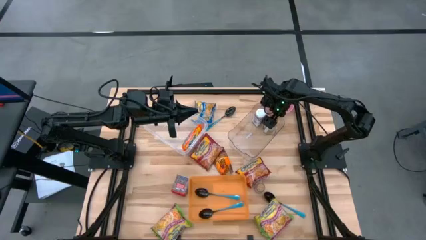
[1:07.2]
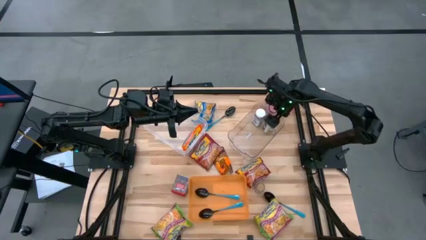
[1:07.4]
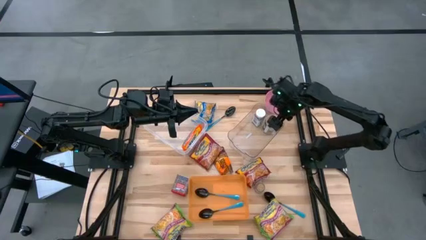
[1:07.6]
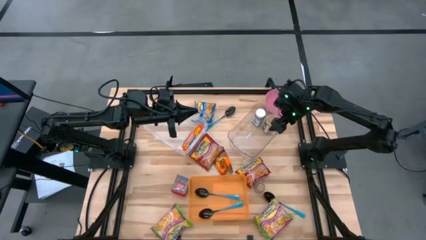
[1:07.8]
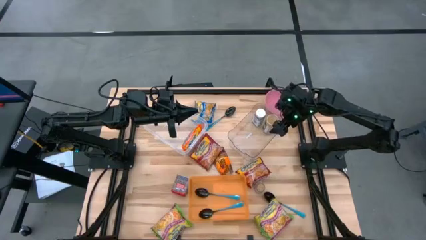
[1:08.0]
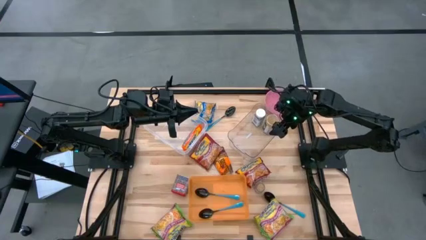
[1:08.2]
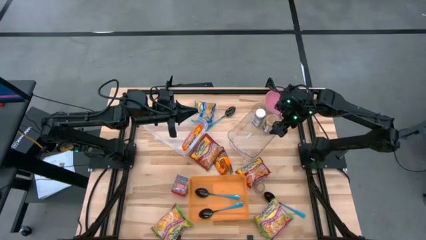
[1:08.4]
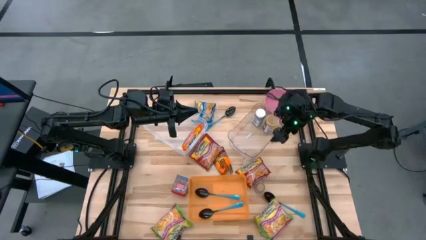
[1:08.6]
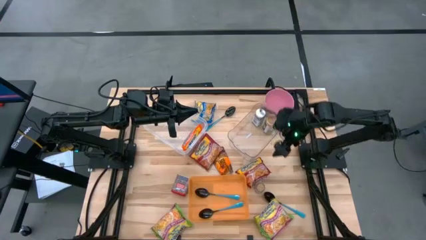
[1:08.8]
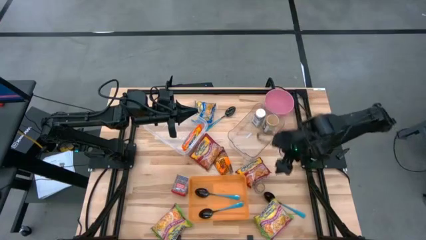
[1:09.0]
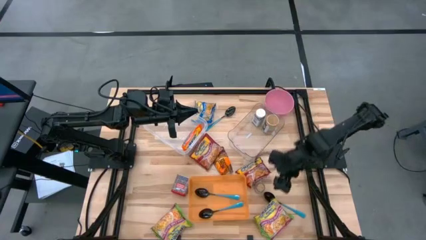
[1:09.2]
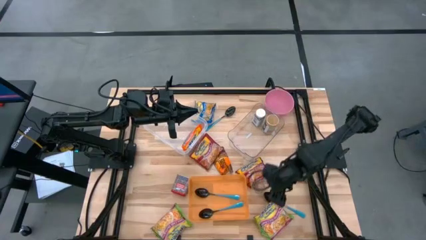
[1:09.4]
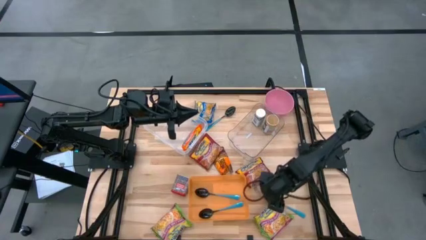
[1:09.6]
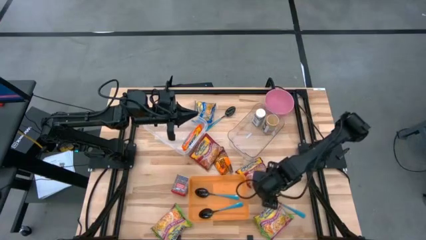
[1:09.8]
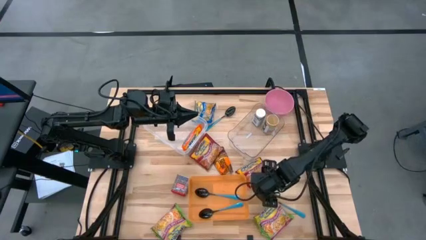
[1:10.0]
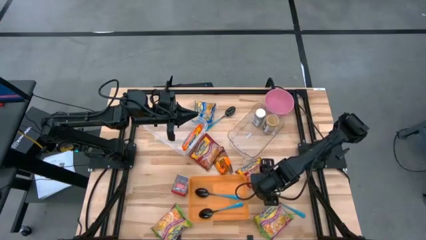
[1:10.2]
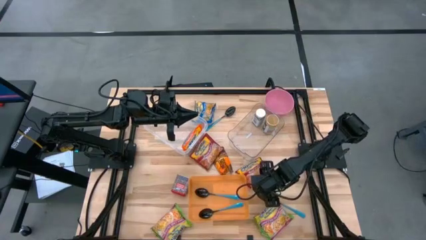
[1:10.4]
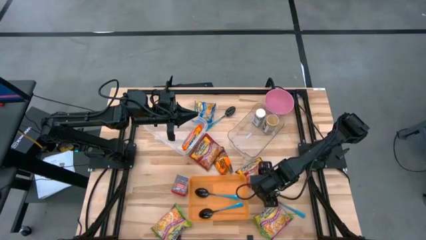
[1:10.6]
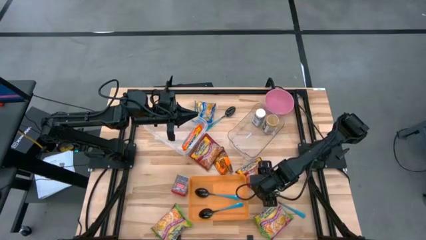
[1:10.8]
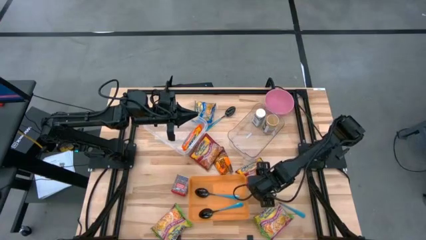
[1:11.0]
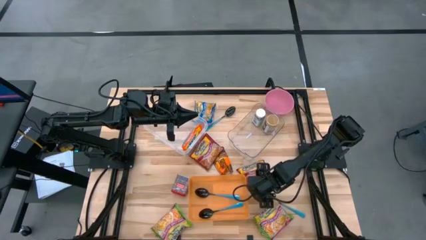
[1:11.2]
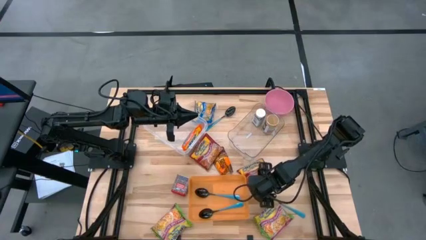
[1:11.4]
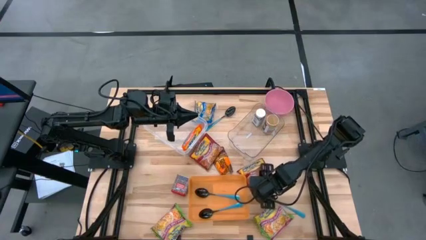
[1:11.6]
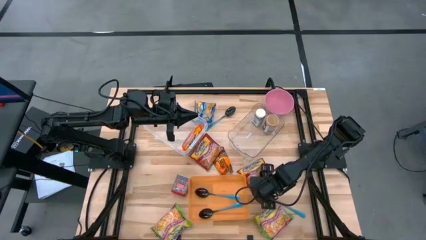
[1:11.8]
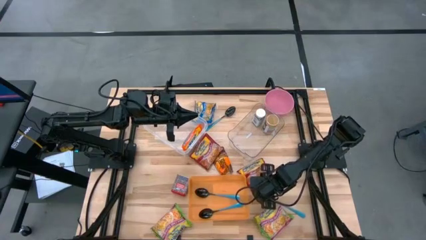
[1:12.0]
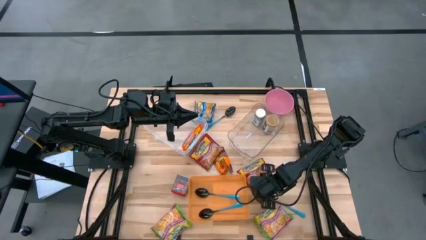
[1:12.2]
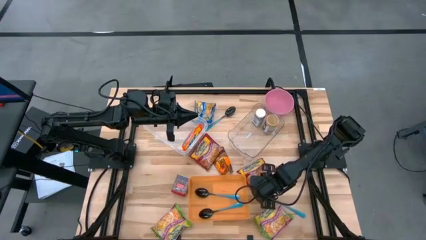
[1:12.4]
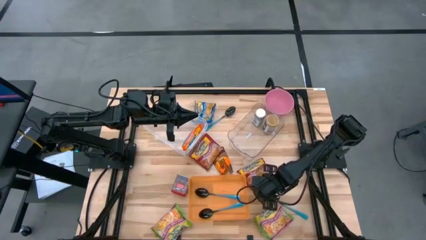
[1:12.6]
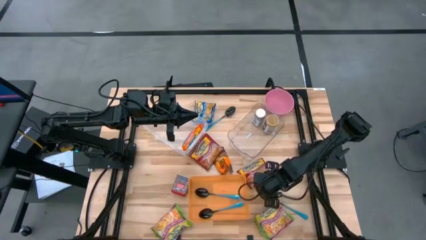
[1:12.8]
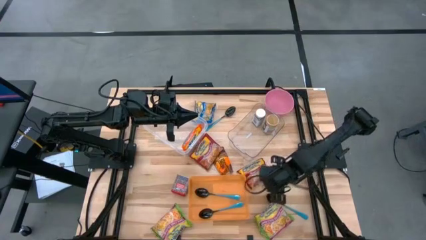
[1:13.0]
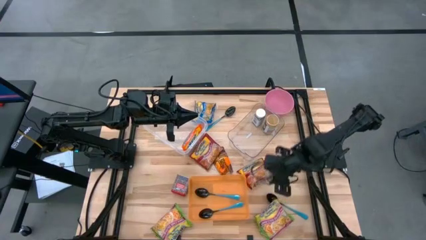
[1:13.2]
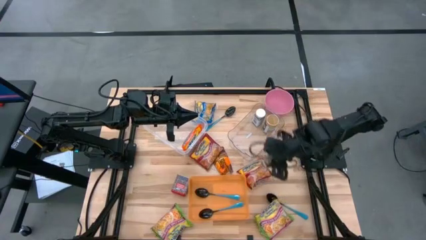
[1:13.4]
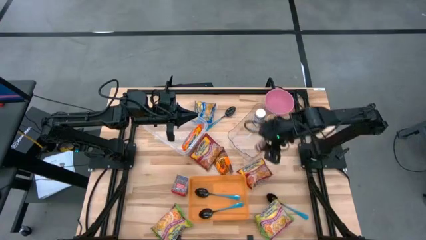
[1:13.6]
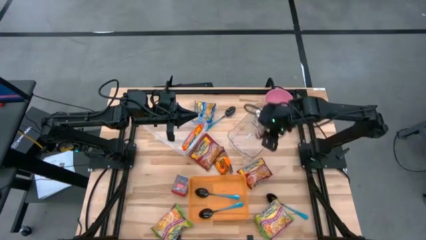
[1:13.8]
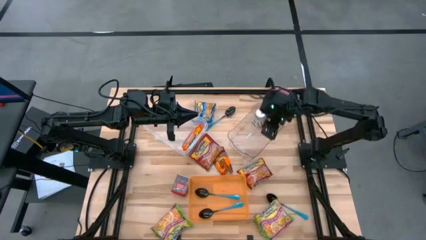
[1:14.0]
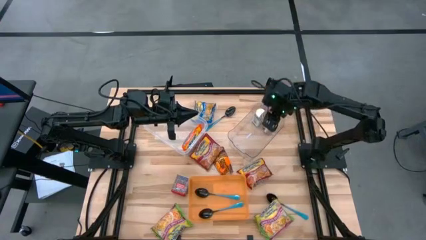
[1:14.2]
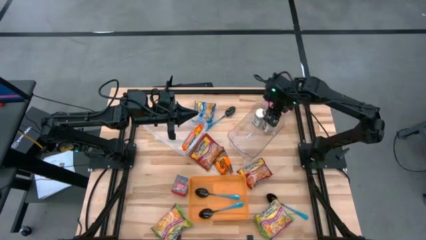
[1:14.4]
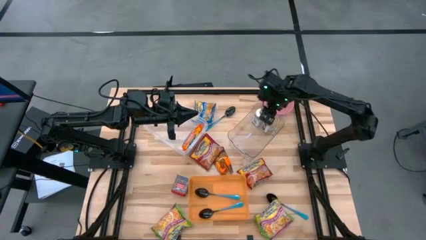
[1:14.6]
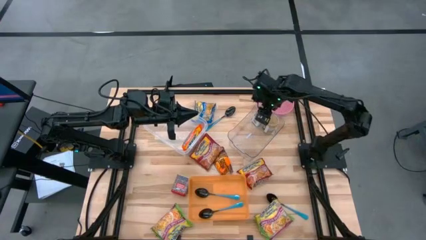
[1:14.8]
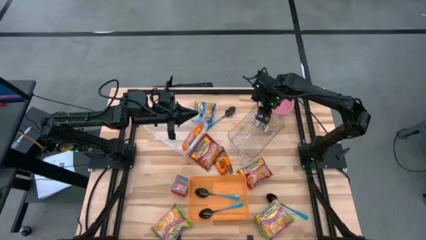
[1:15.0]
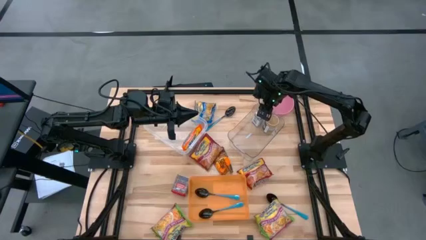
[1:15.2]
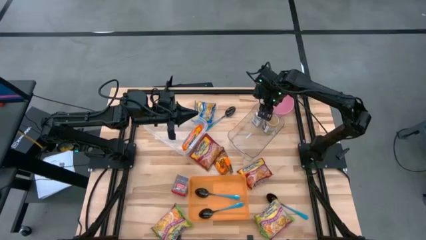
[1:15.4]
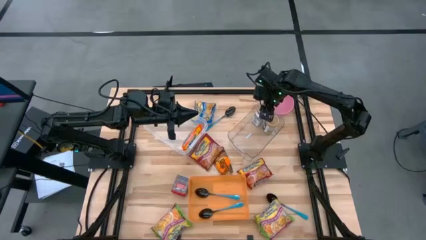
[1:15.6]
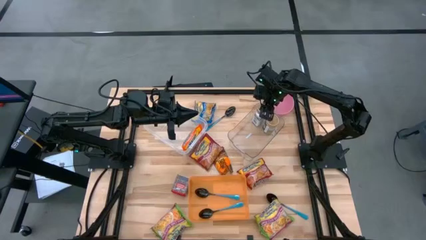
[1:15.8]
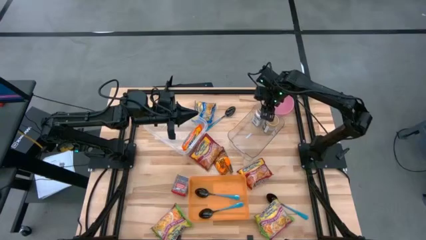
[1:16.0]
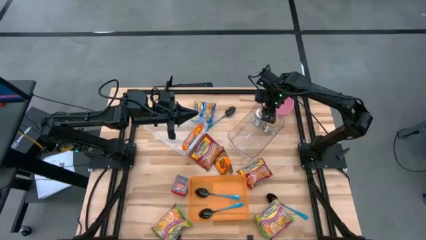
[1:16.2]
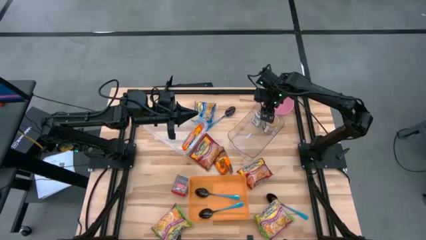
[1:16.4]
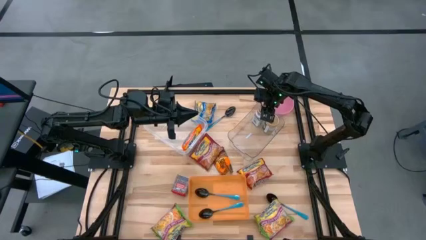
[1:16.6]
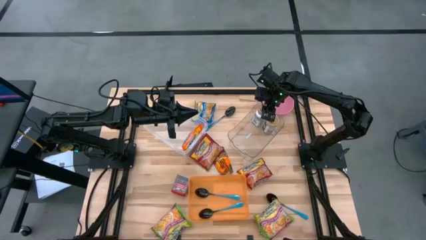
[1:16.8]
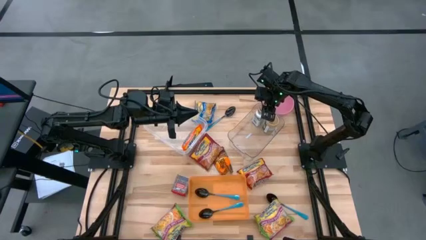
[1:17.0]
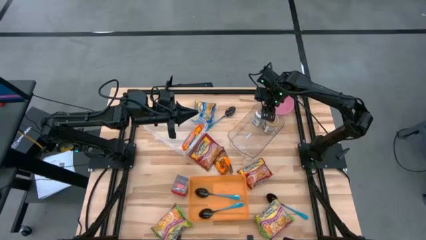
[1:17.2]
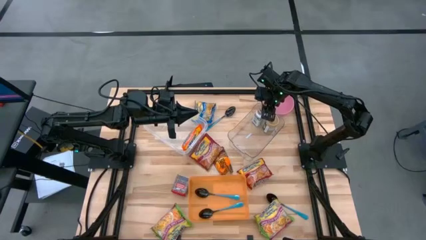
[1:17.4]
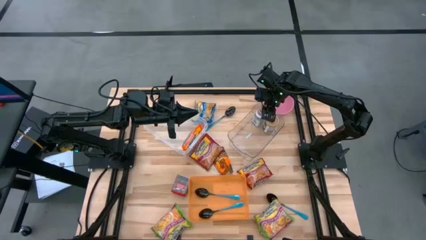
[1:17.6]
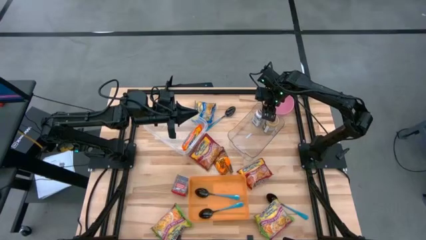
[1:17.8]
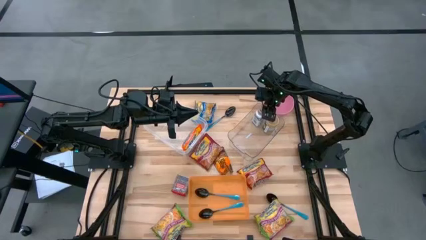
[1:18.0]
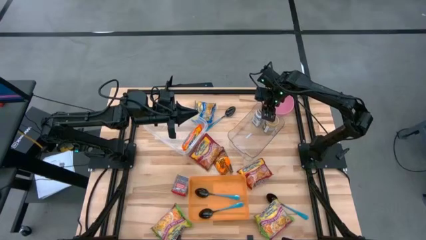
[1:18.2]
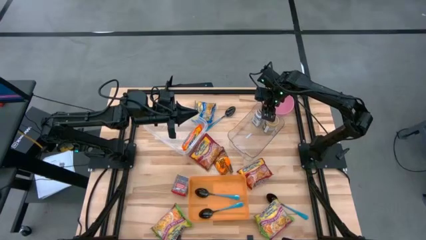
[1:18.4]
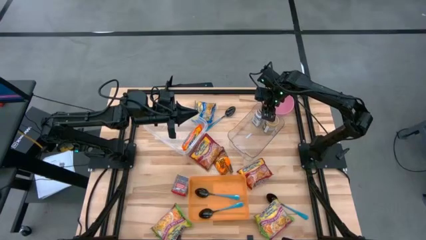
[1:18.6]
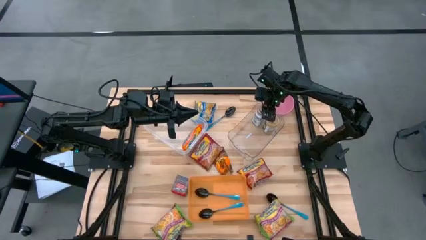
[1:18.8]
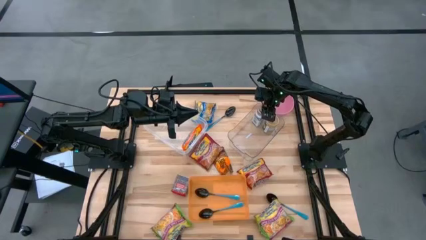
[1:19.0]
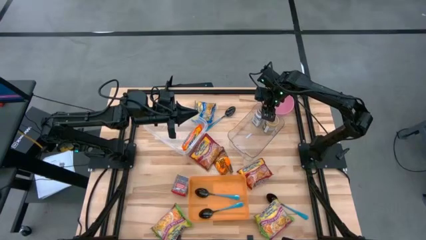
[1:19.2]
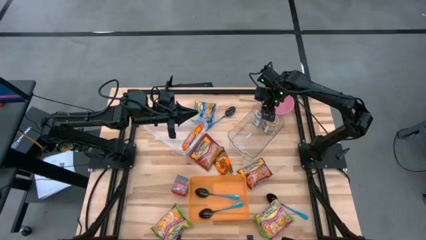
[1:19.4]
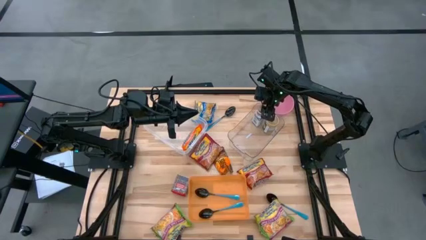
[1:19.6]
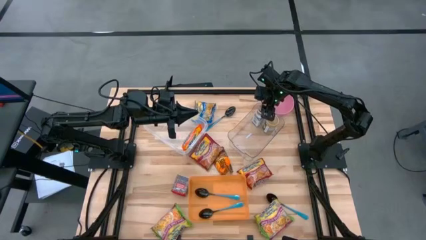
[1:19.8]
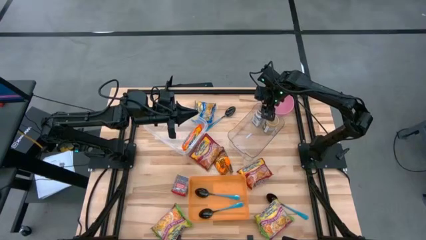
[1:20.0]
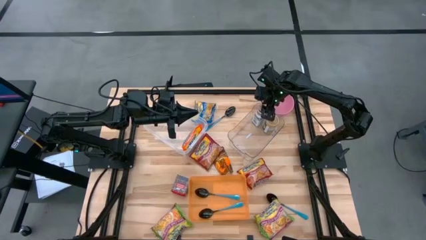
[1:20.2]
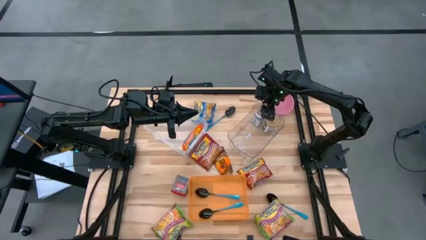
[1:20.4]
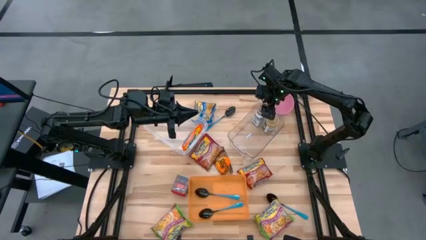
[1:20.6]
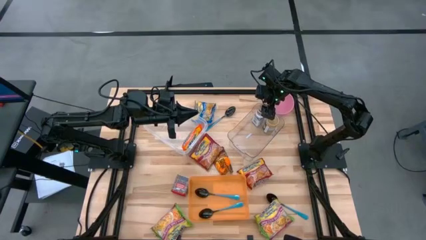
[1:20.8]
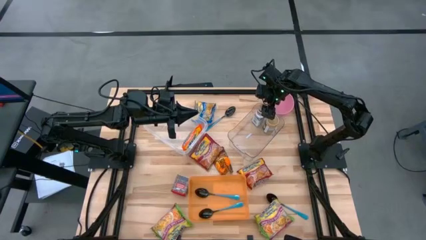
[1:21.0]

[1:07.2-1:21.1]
Task: Pick & Place Food Item
Put the brown seasoning bottle into the transparent bin

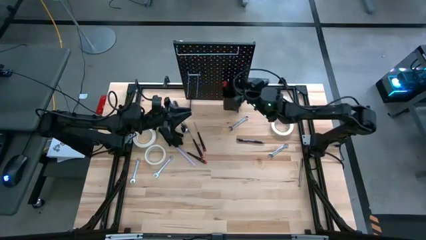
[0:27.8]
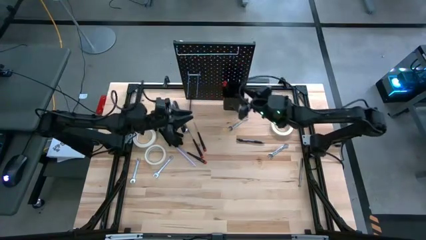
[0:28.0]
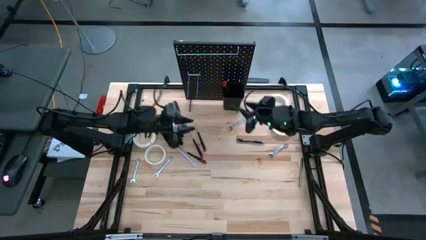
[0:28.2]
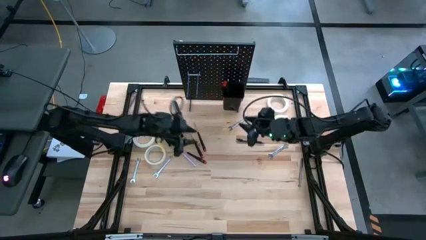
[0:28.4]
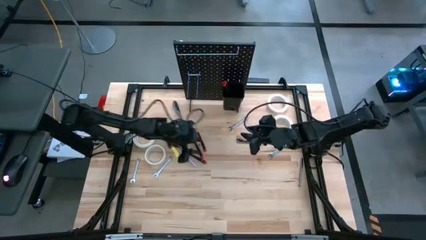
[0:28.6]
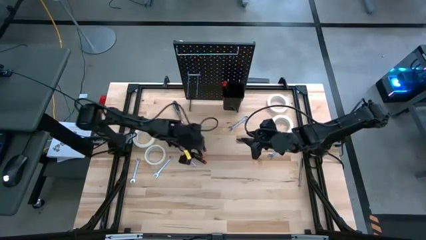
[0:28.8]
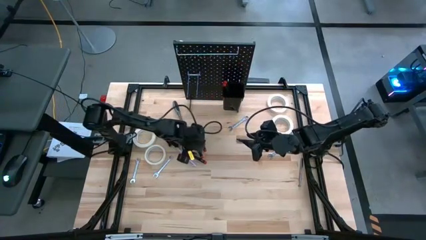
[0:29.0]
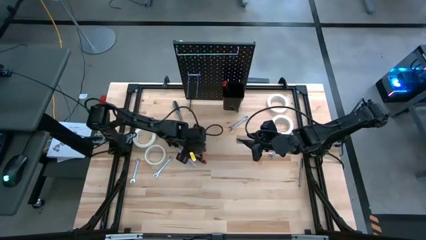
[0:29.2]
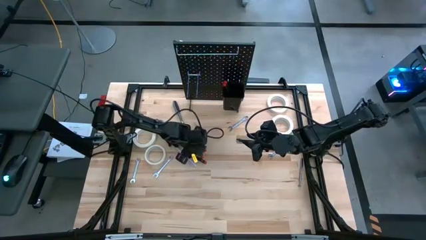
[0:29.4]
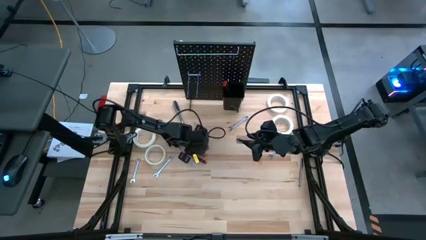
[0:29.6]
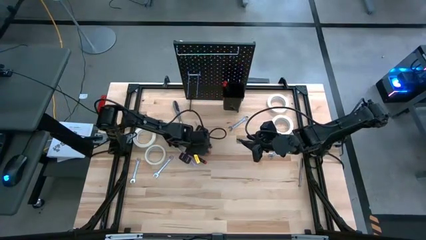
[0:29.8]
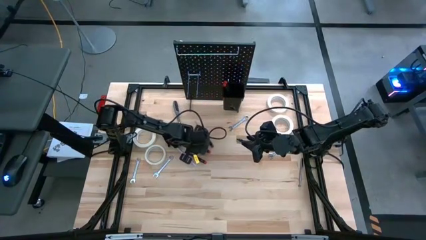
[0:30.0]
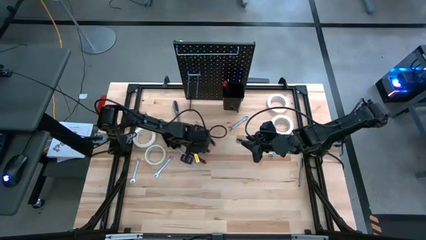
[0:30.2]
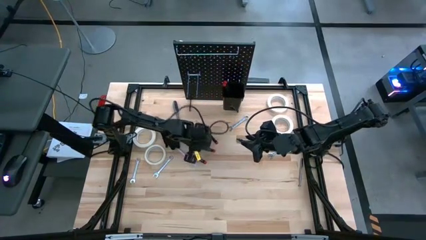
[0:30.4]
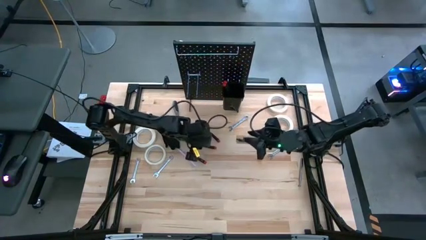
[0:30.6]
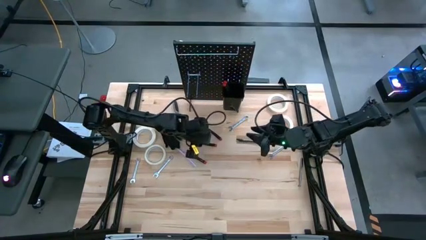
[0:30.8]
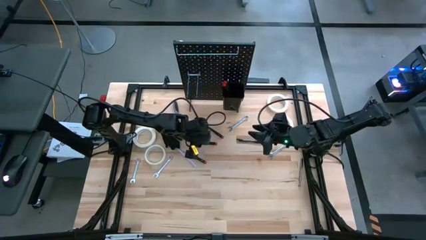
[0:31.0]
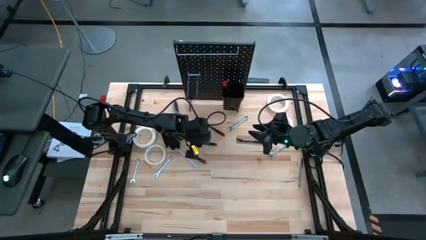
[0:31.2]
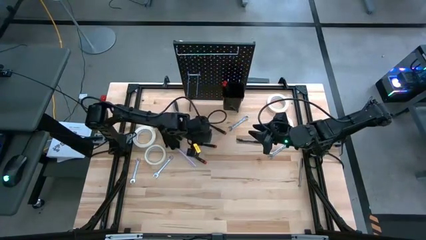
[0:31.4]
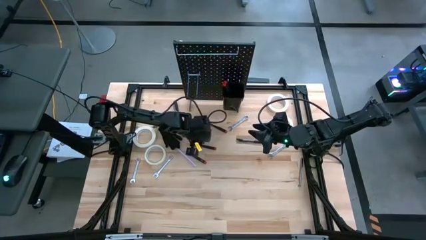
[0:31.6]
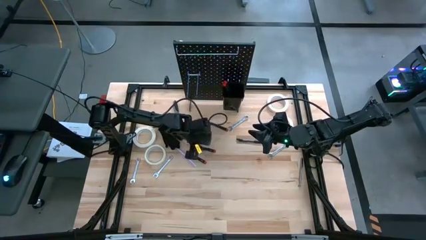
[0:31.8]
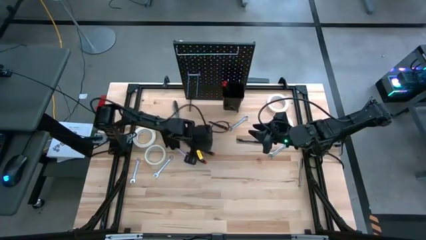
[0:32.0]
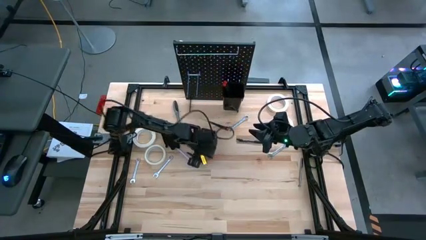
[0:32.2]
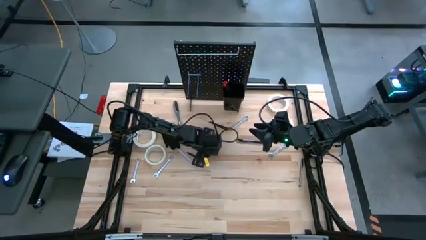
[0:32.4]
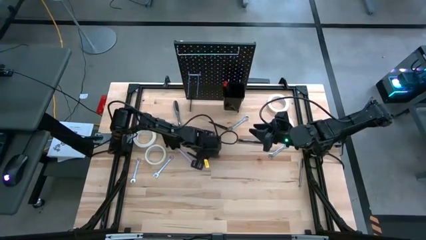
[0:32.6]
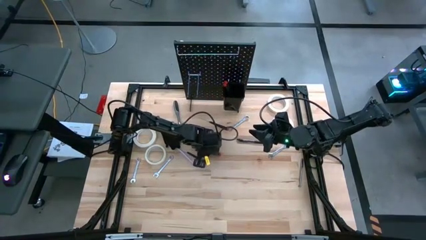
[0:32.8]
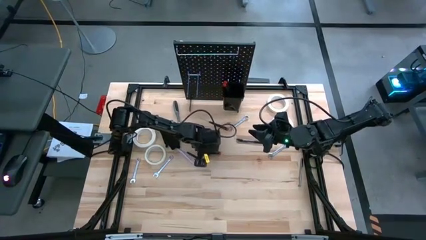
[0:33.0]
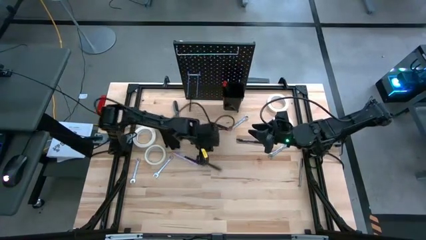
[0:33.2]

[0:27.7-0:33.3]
Task: Hang tools onto peg board
Put the nut driver into the black bin on the pegboard
